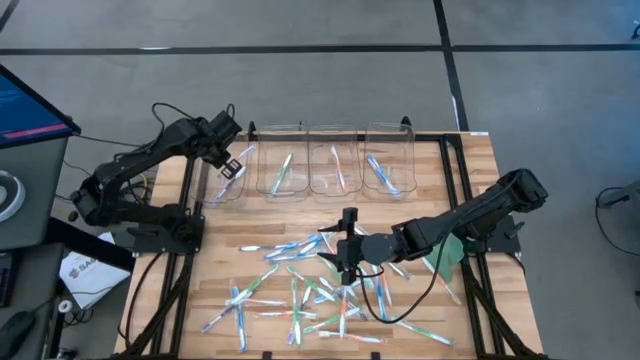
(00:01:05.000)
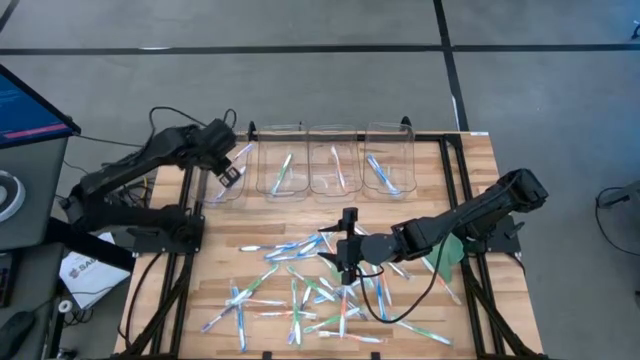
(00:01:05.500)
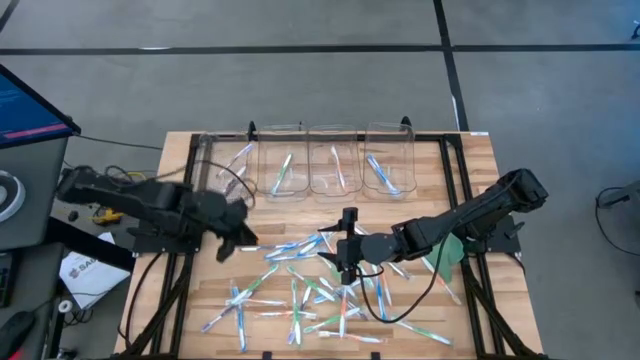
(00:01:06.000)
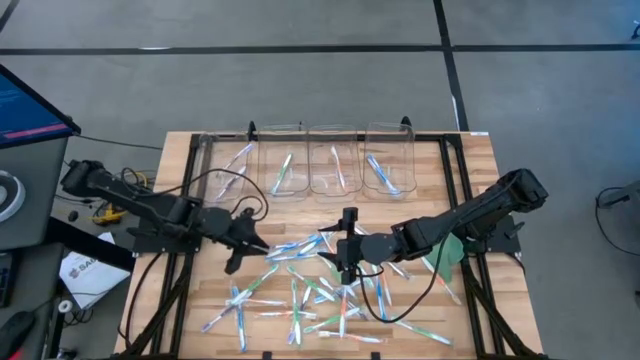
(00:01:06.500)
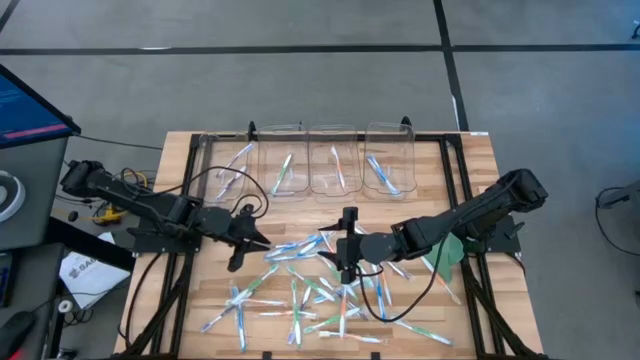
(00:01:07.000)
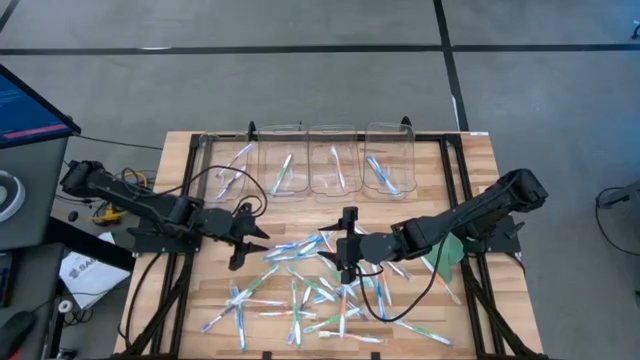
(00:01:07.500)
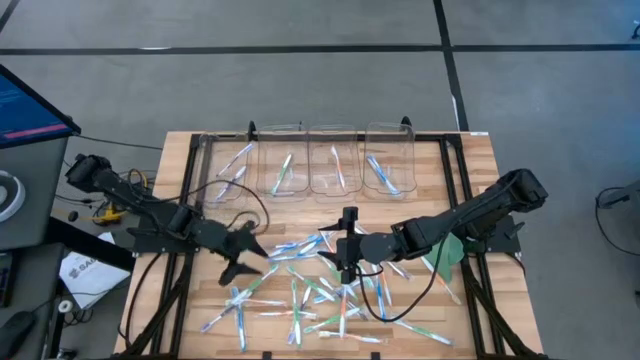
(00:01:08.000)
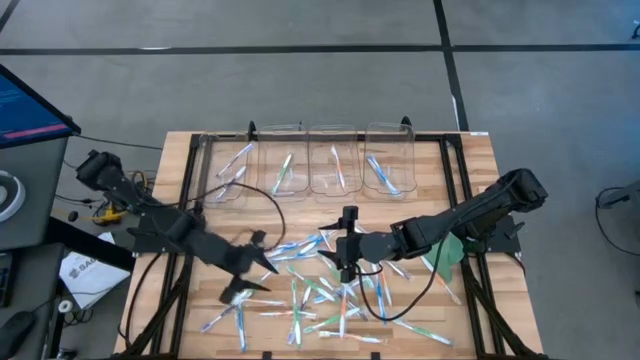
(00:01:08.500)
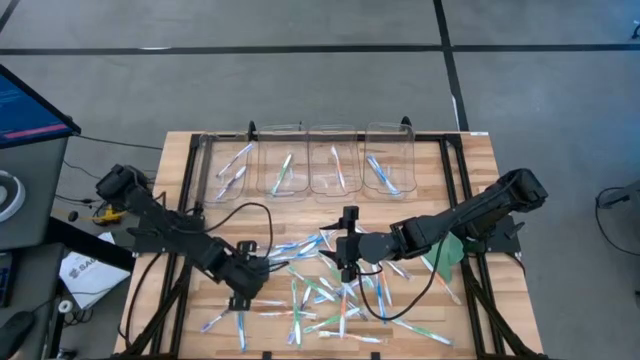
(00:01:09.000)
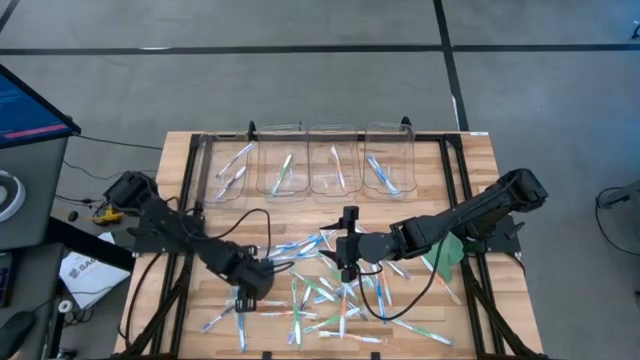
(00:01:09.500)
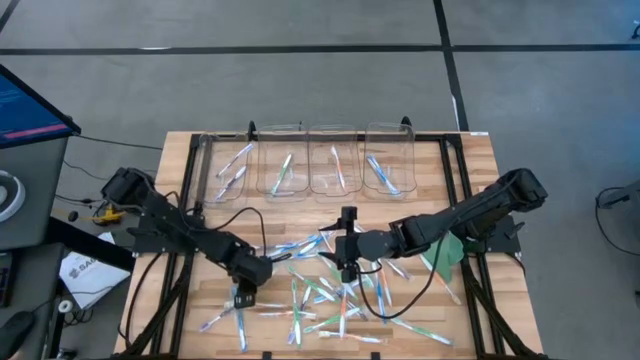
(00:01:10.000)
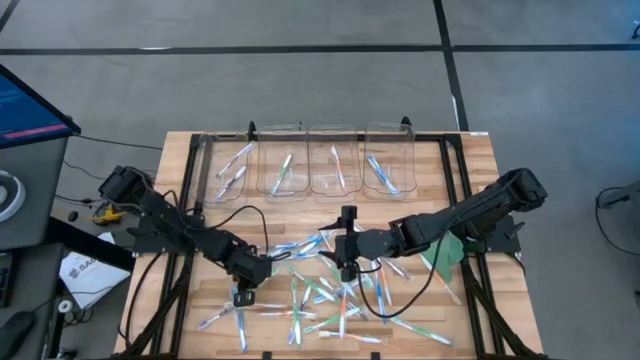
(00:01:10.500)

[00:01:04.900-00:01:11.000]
Task: Pick & Place Toothbrushes
Put the green toothbrush into the middle left transparent bin

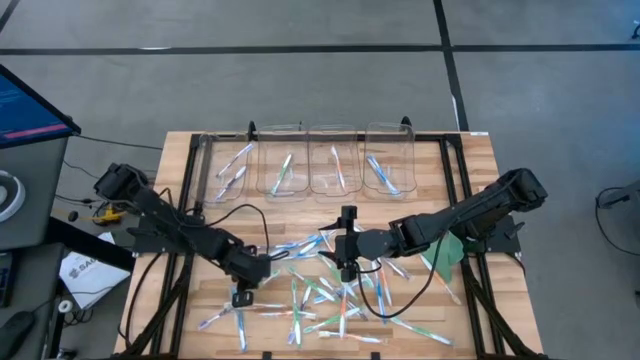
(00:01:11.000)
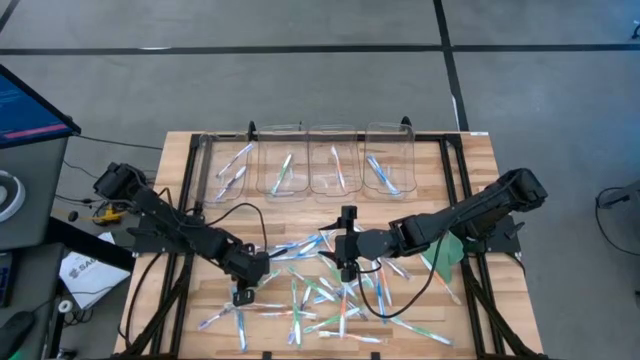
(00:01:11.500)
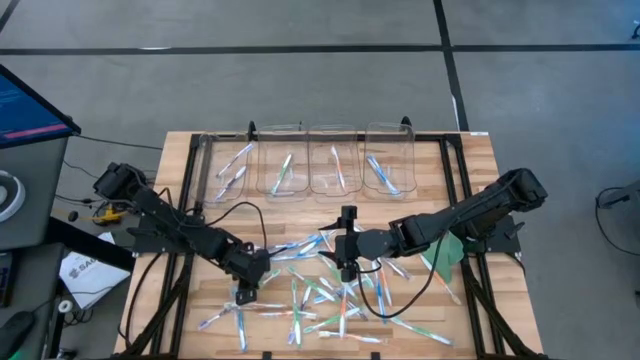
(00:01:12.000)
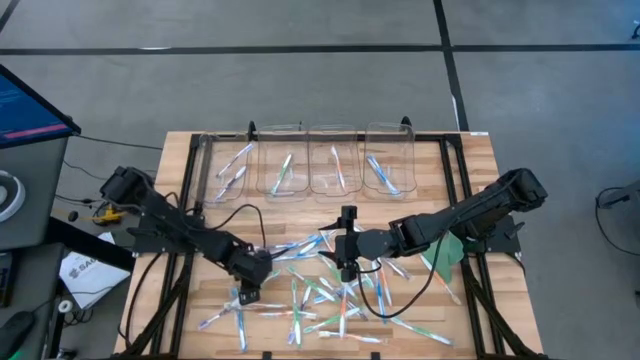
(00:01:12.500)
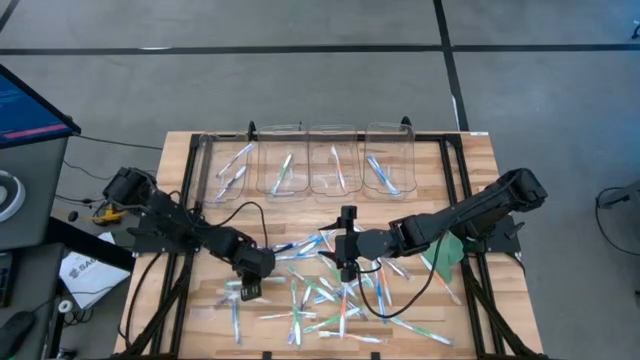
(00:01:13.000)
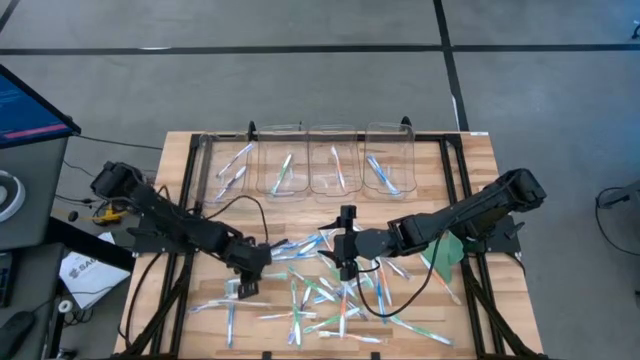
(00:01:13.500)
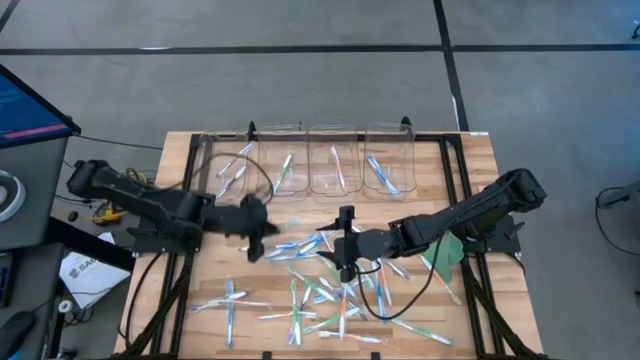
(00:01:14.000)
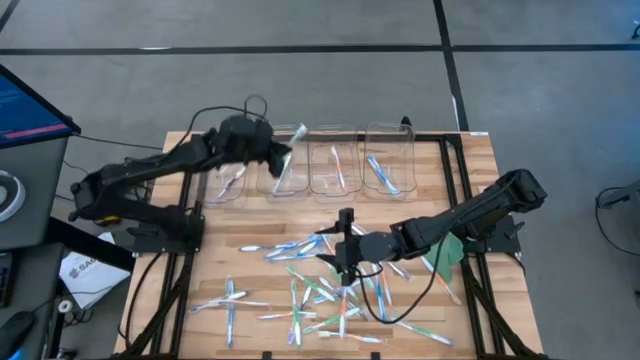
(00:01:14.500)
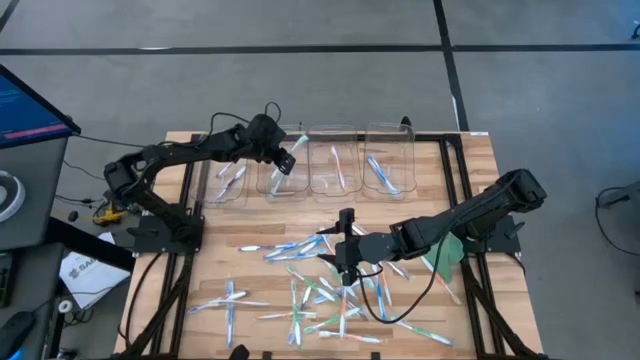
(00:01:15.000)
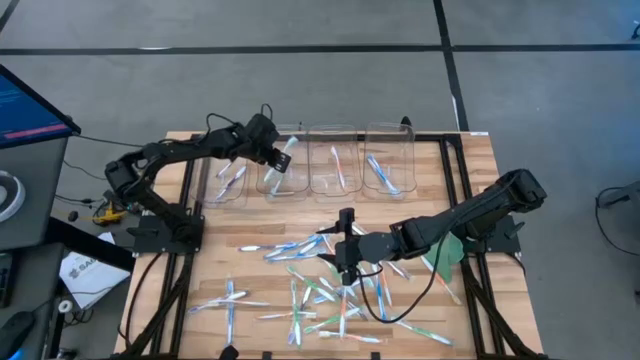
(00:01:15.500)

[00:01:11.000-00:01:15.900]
Put the green toothbrush into the middle left transparent bin

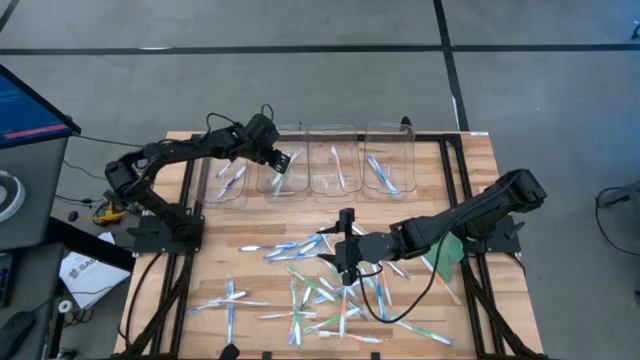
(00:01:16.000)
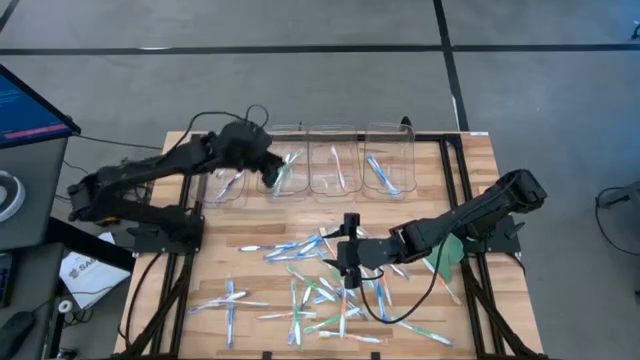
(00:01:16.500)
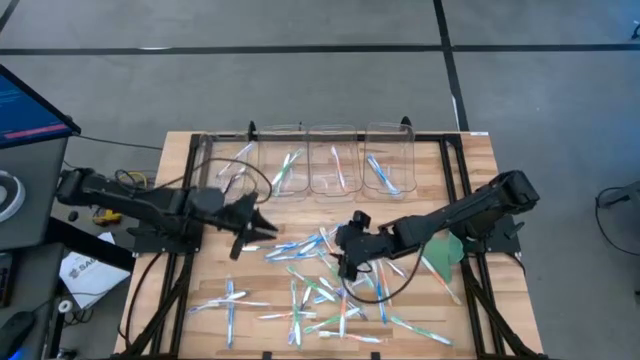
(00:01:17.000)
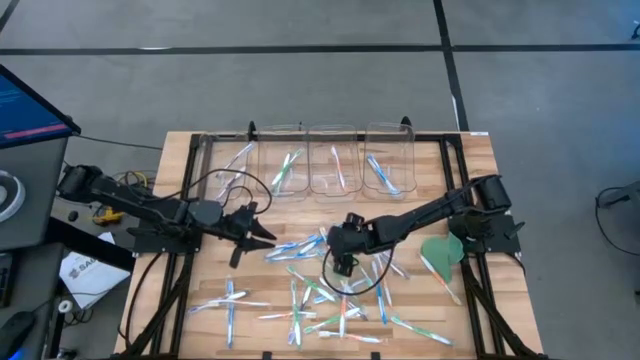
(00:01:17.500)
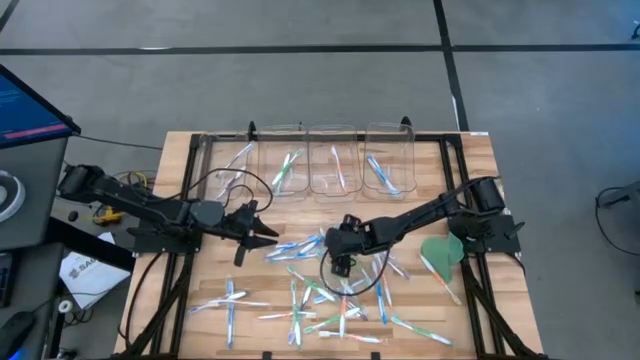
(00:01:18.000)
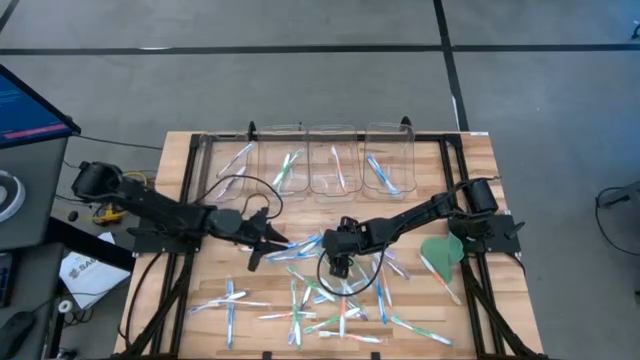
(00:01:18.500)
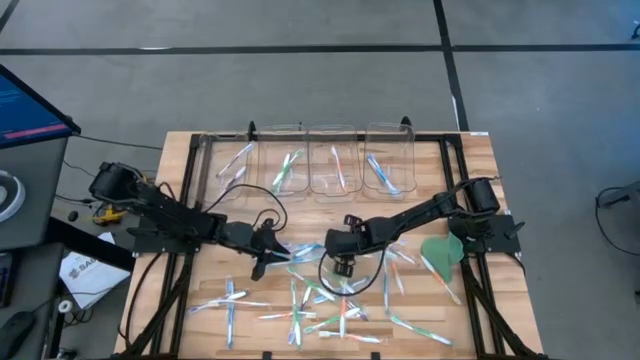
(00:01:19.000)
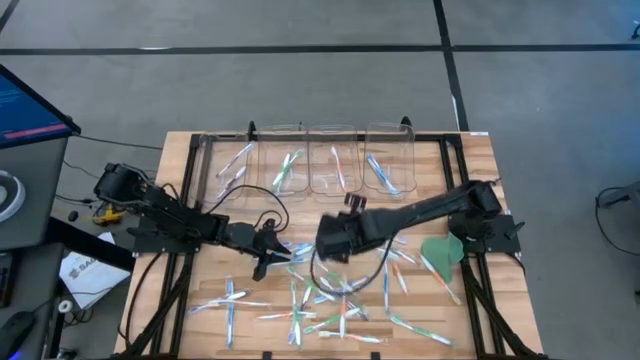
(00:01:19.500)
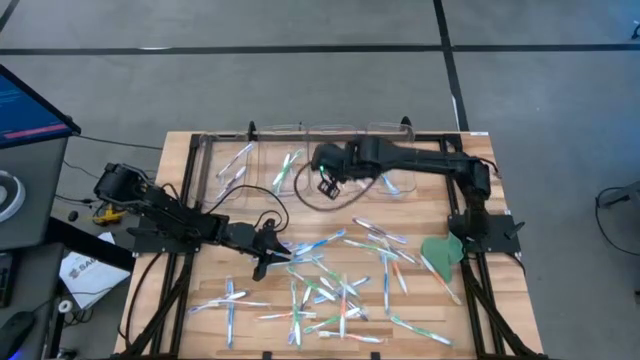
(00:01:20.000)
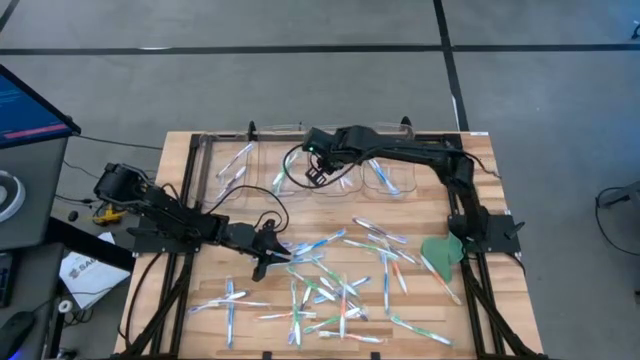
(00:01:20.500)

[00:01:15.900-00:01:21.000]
Put the orange toothbrush into the middle right transparent bin

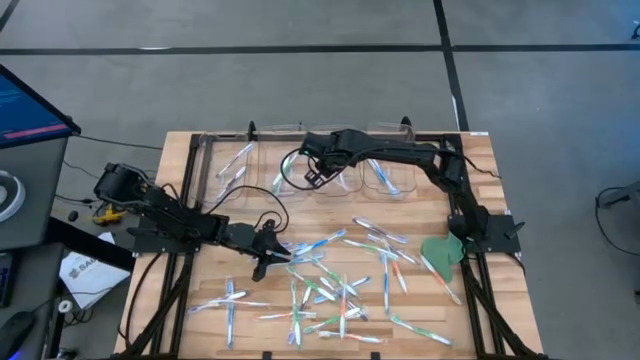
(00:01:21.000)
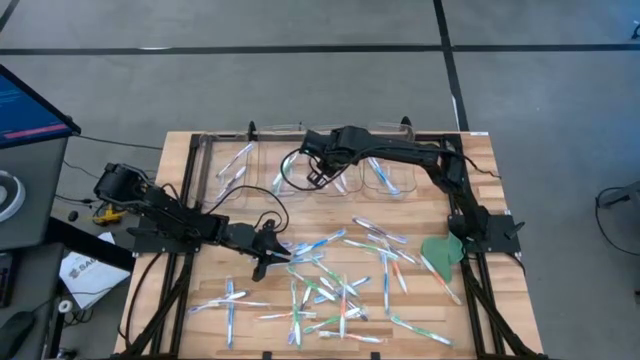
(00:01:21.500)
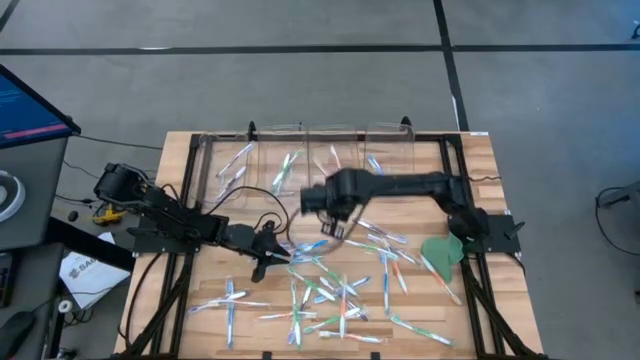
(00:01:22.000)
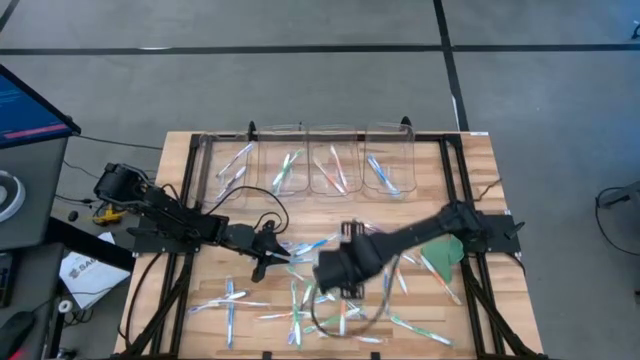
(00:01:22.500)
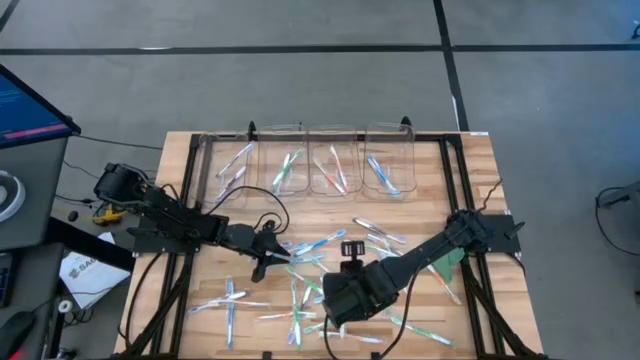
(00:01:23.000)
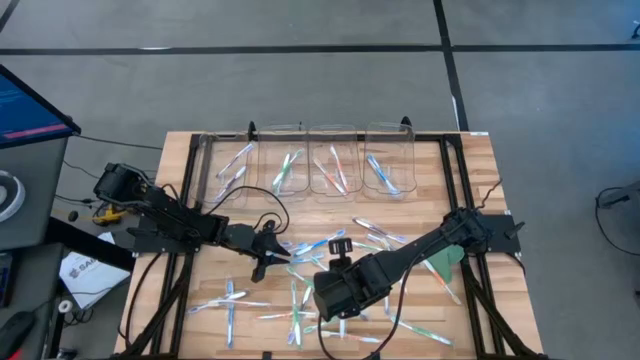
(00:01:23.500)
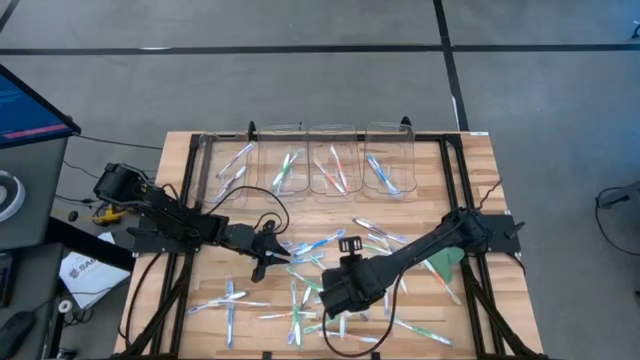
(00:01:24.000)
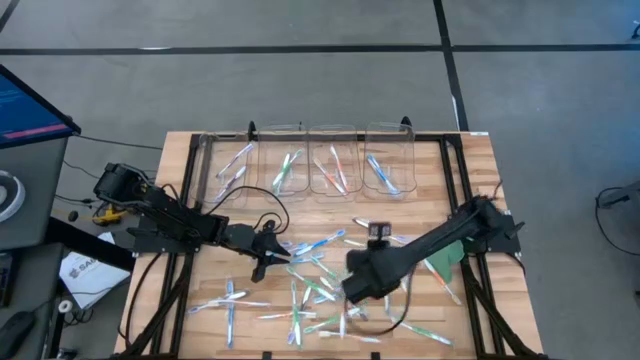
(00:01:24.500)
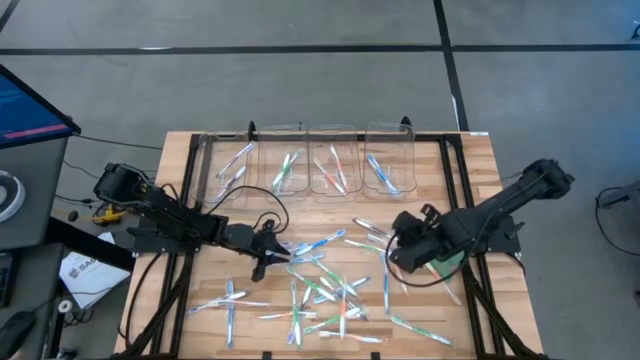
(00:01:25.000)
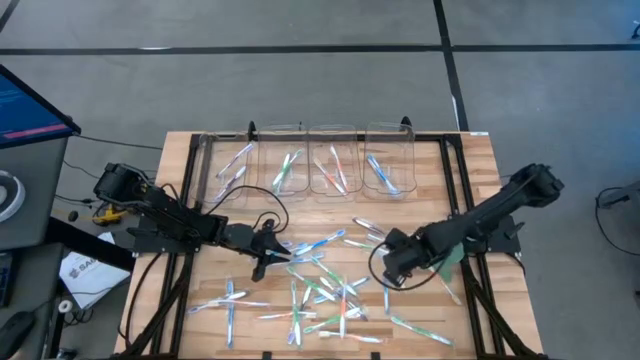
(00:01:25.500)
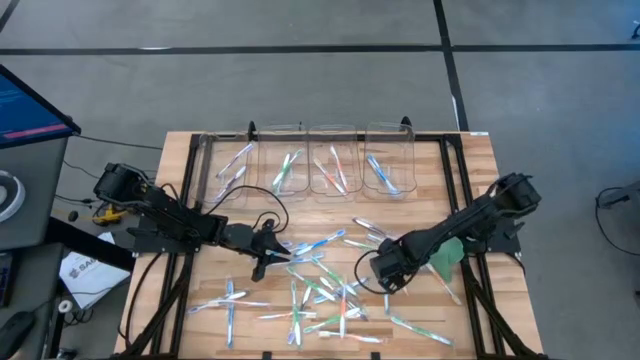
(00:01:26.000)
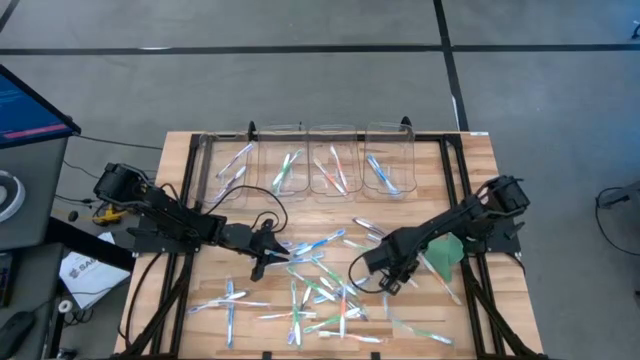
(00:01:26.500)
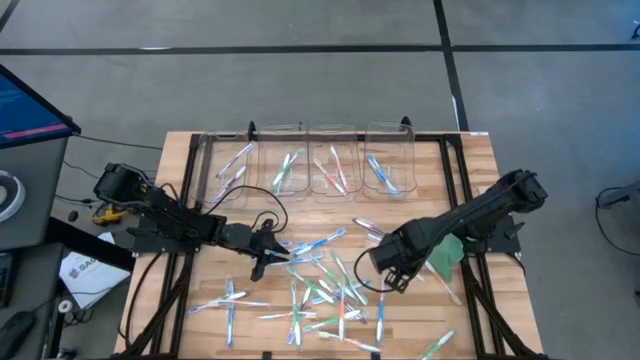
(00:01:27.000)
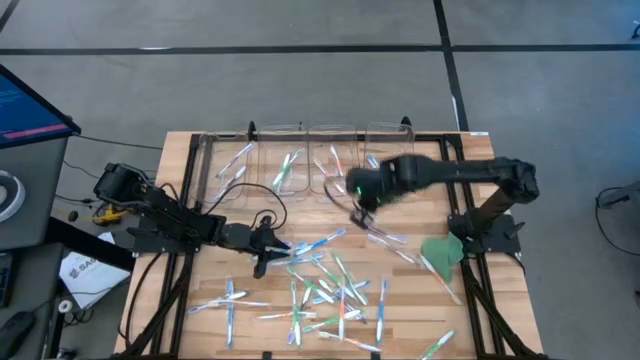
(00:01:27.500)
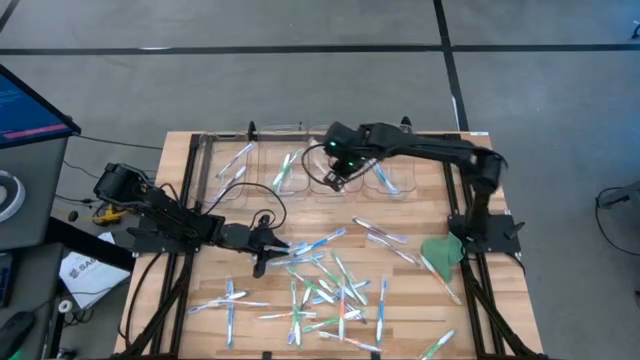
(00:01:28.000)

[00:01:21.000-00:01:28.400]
Put the orange toothbrush into the middle right transparent bin
